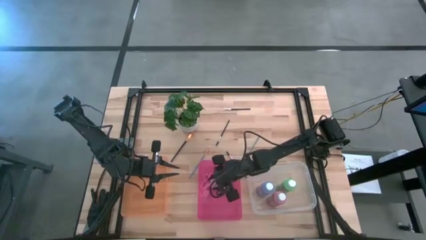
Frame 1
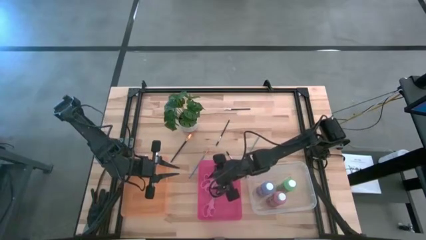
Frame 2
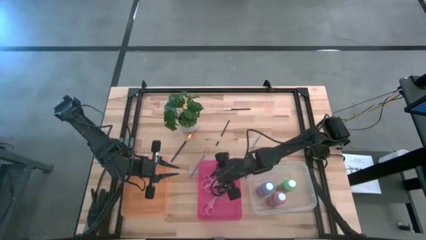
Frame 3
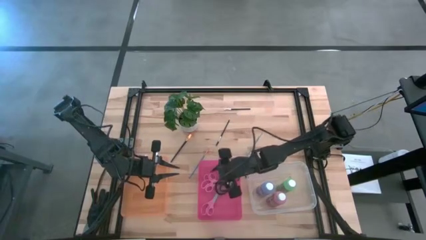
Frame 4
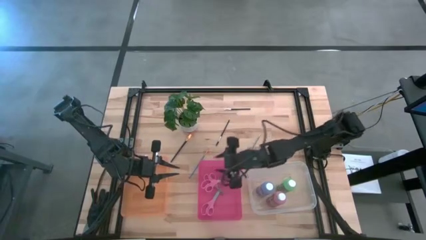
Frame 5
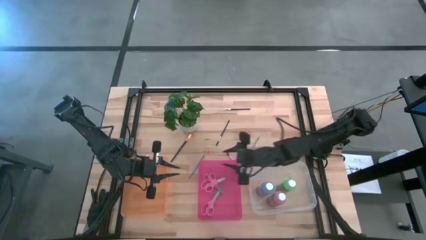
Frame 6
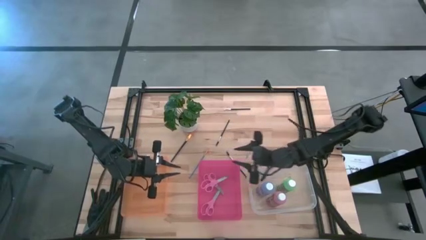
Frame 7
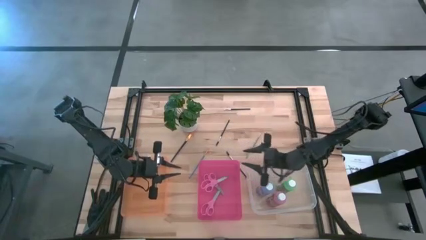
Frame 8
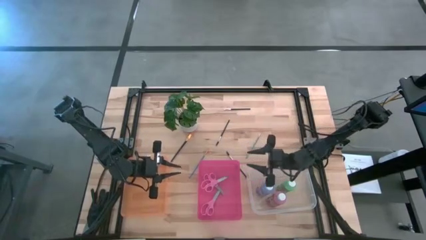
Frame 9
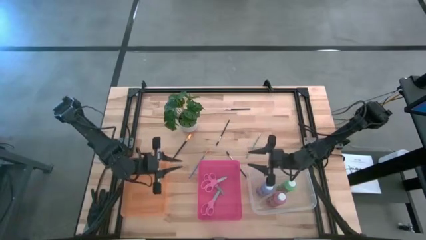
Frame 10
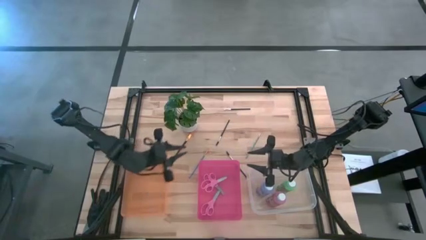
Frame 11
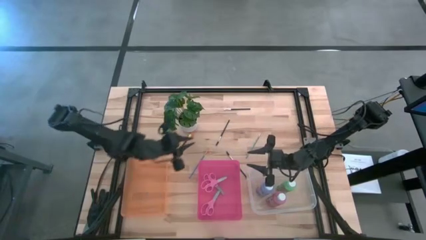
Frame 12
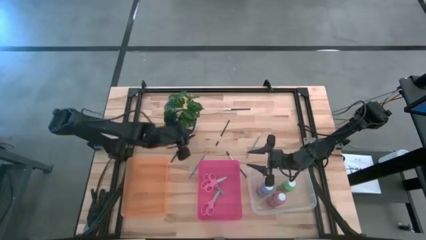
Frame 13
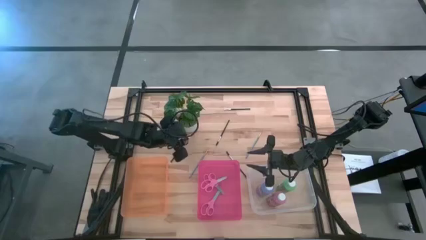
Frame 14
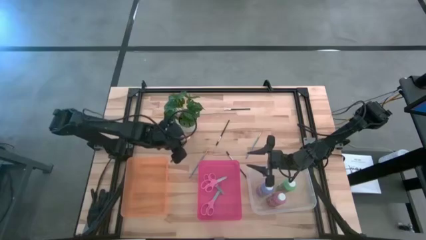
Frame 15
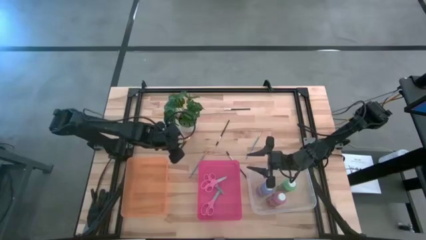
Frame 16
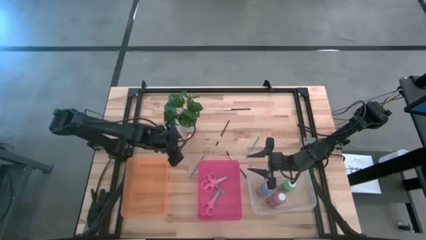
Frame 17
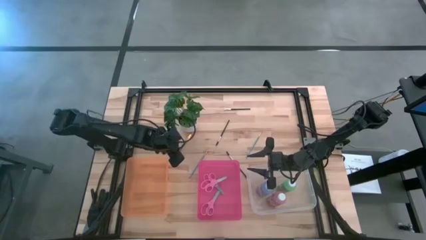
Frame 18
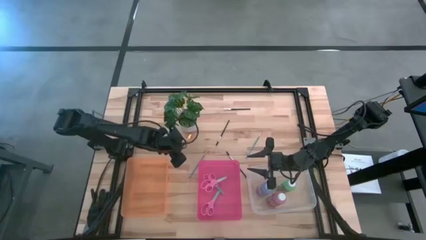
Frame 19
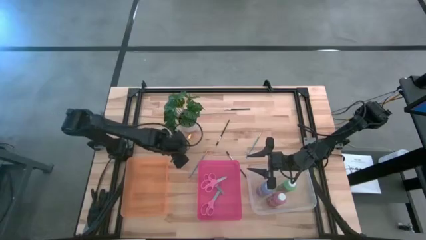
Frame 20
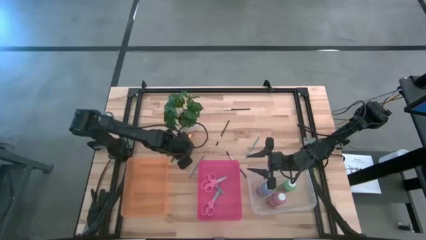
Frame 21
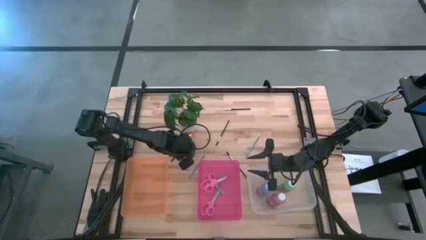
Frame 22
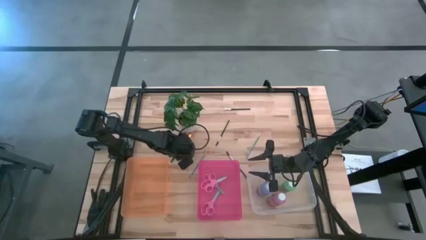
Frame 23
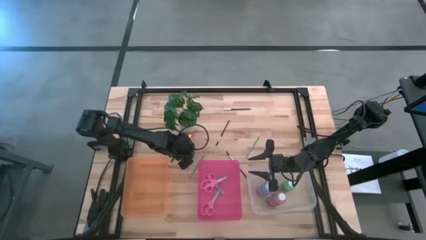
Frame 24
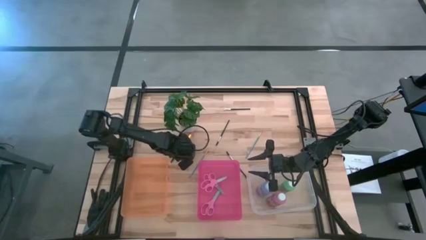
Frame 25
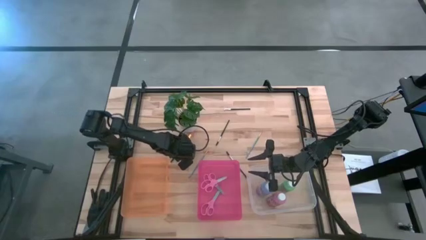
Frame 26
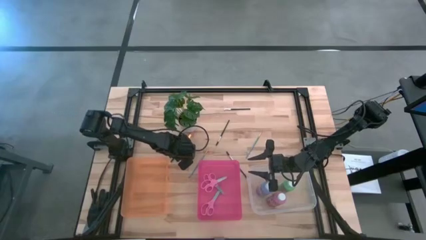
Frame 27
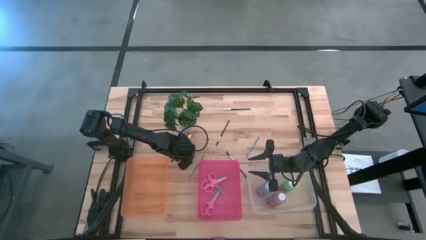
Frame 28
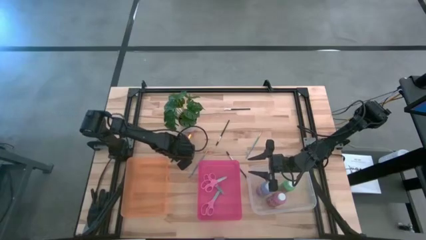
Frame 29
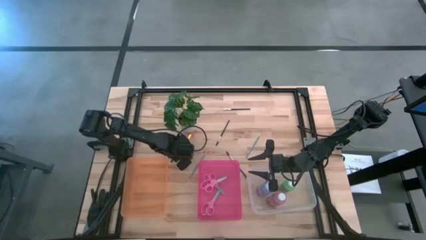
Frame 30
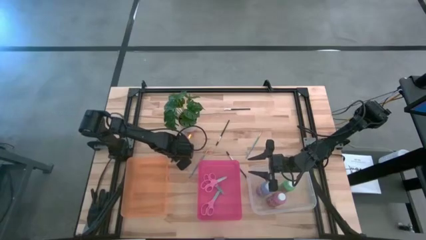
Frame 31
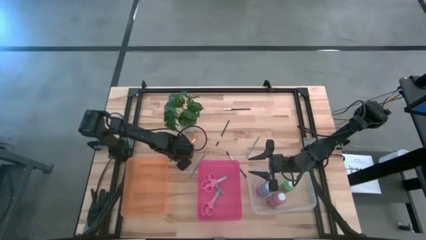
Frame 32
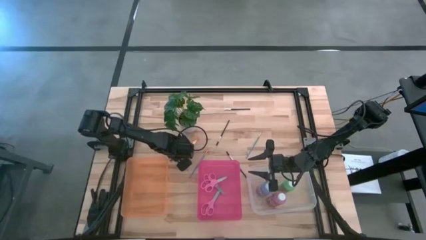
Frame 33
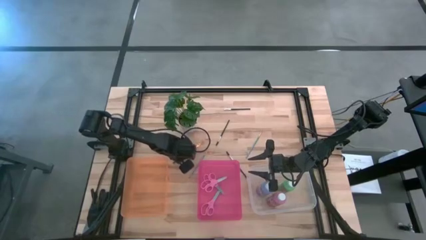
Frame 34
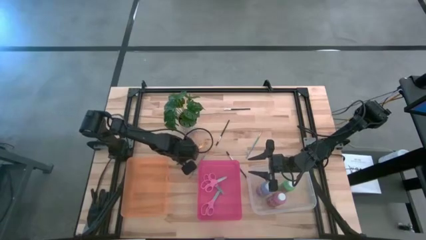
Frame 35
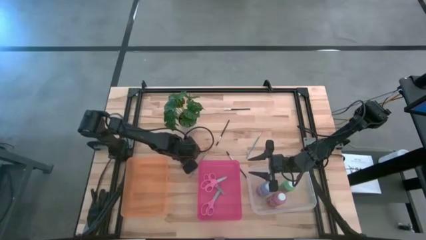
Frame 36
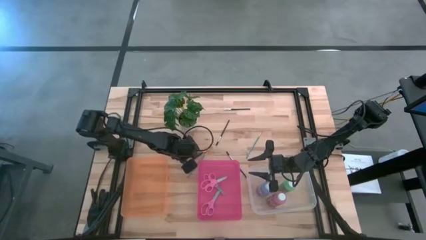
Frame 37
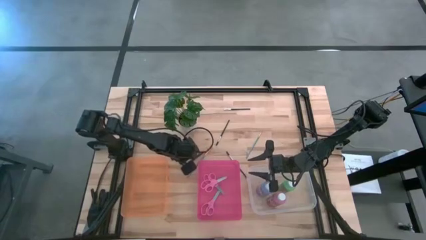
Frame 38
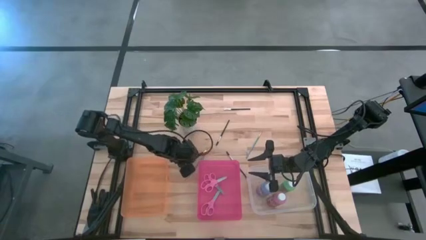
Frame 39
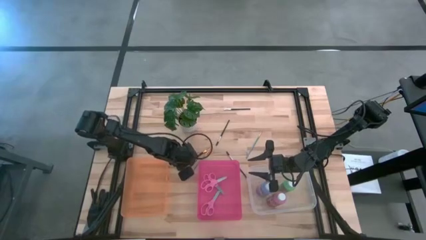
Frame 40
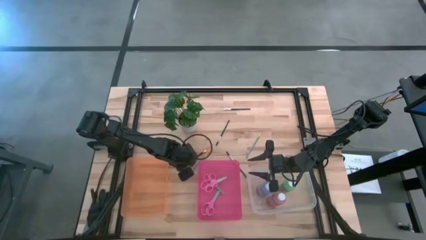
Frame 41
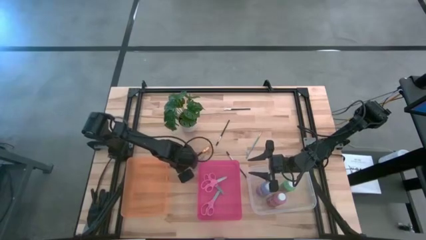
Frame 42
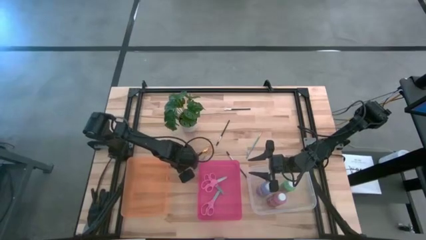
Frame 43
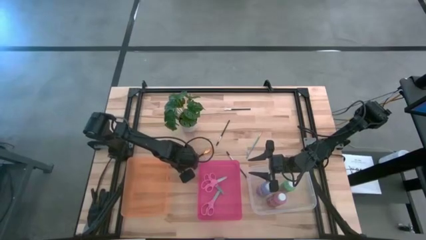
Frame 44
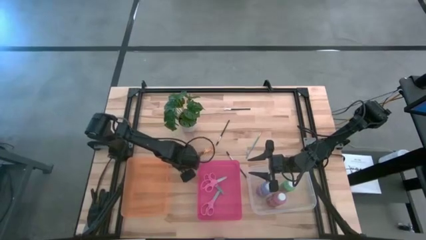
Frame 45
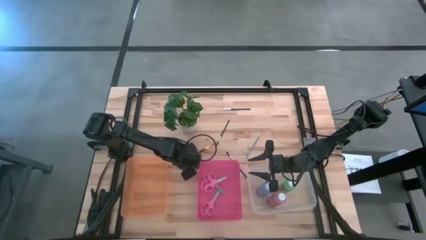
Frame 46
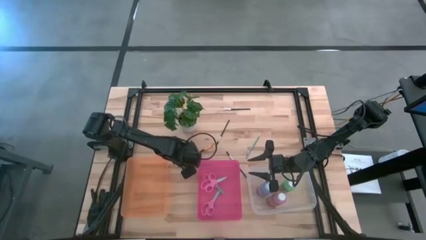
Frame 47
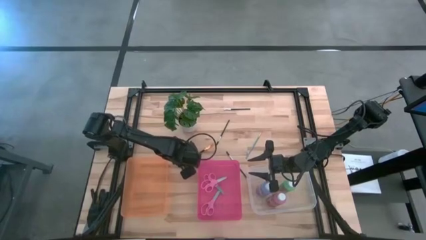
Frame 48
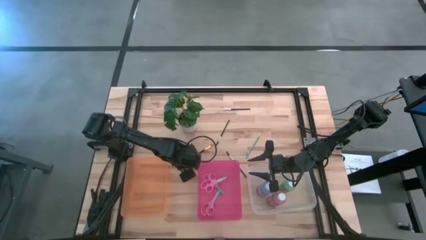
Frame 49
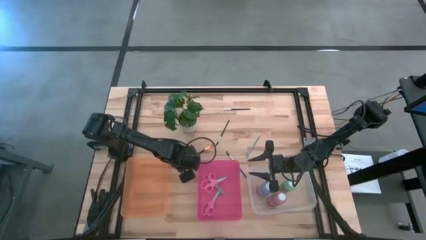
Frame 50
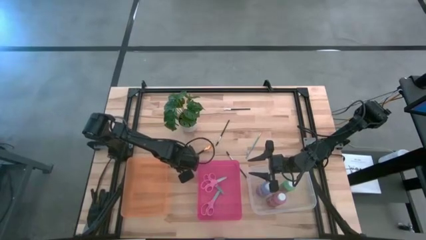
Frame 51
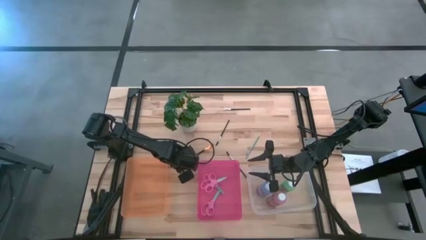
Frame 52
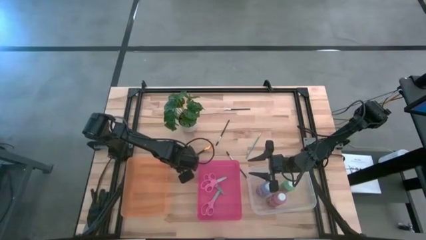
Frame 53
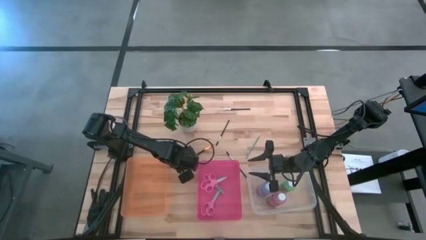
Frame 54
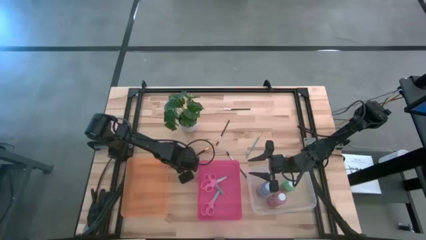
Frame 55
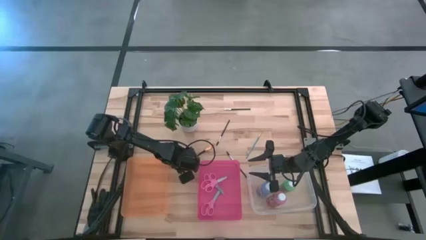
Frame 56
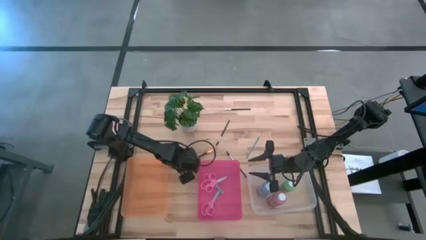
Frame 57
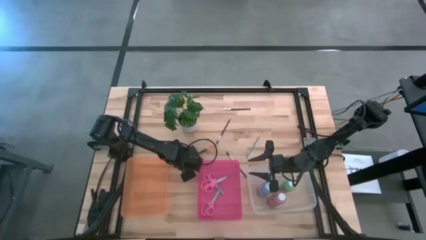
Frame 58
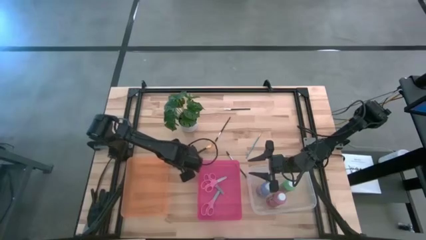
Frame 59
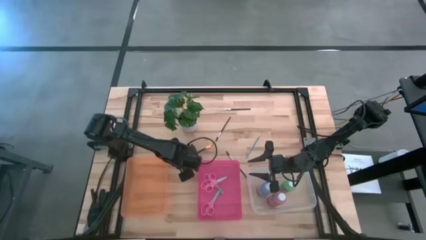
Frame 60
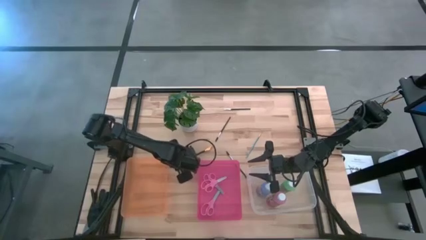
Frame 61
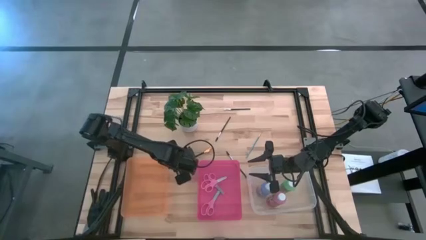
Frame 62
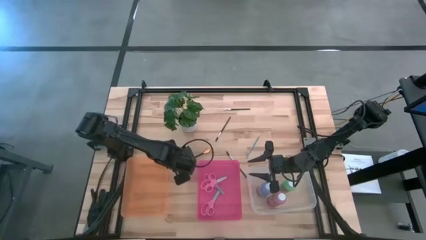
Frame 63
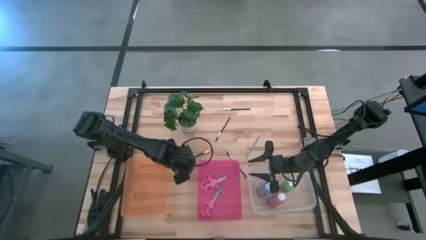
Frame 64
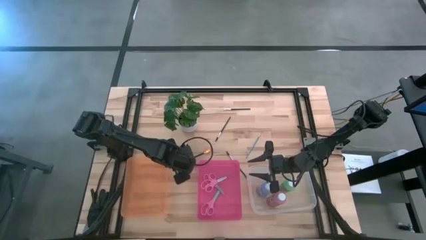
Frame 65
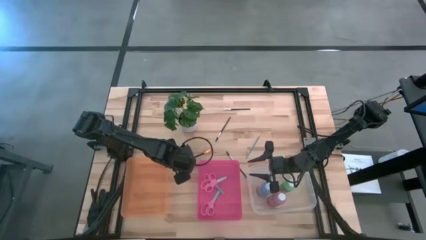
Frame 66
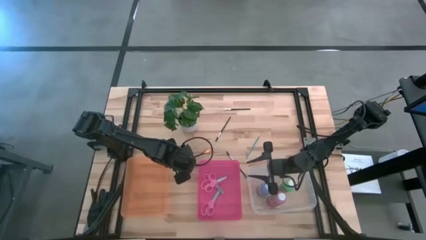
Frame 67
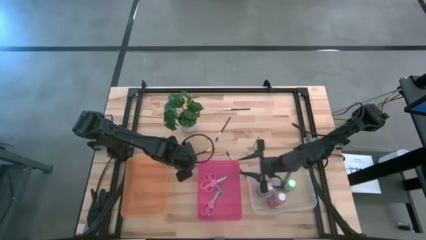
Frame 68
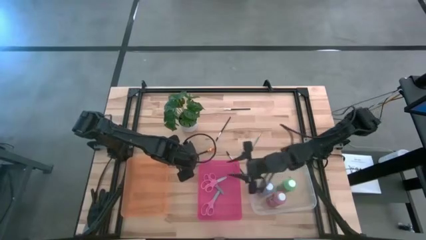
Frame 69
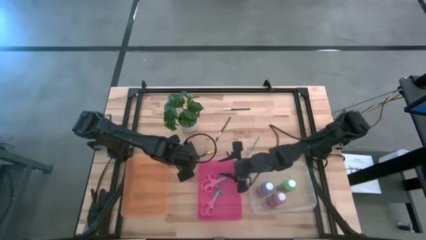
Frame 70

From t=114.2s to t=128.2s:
Task: Pick & Place Paint Supplies
Put the black paintbrush into the orange bin

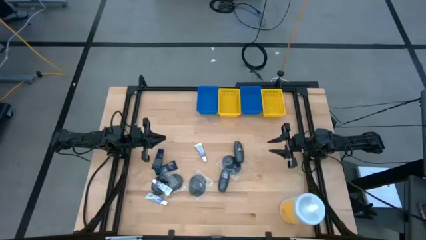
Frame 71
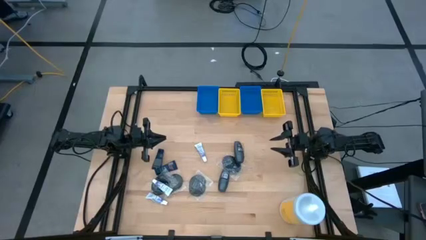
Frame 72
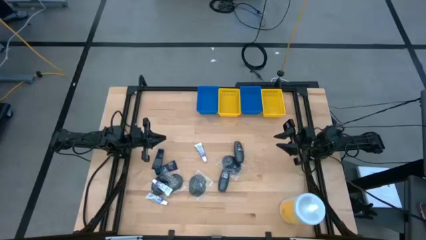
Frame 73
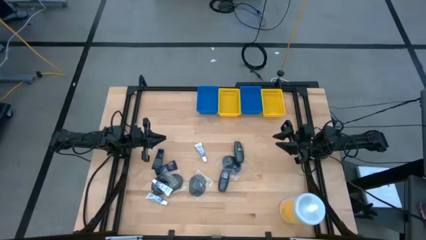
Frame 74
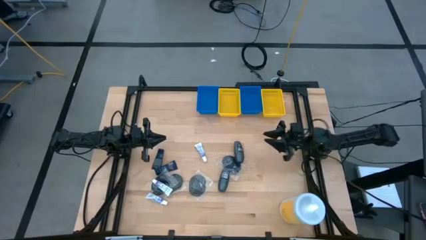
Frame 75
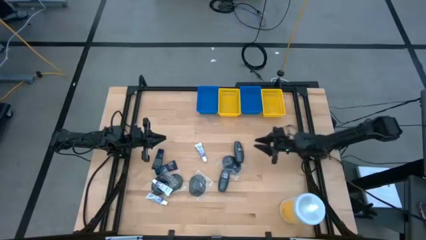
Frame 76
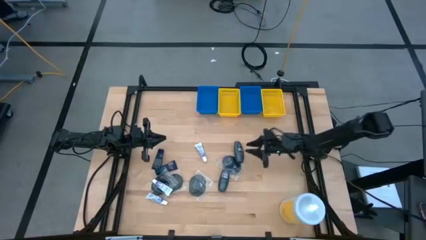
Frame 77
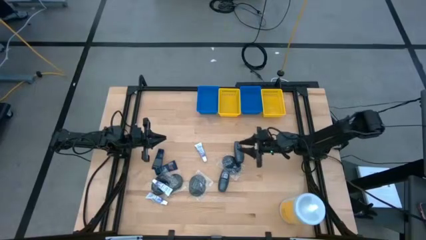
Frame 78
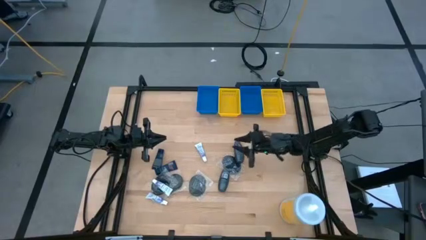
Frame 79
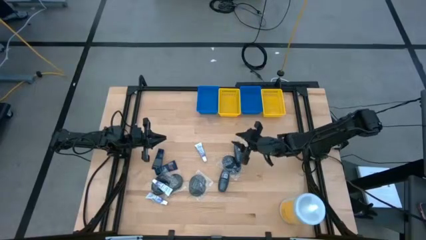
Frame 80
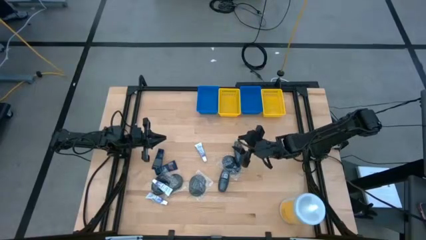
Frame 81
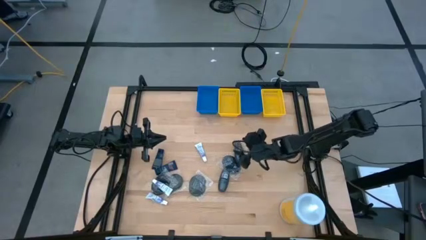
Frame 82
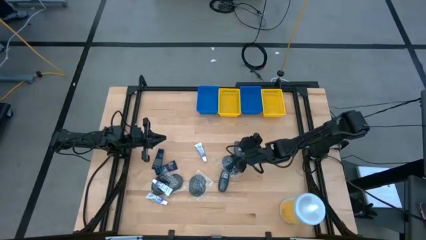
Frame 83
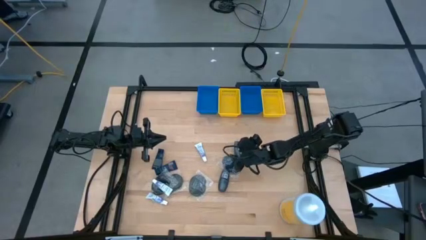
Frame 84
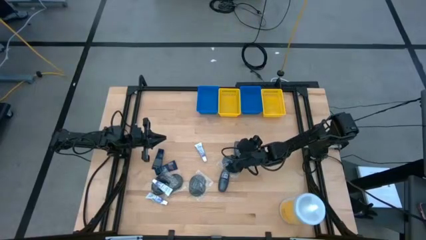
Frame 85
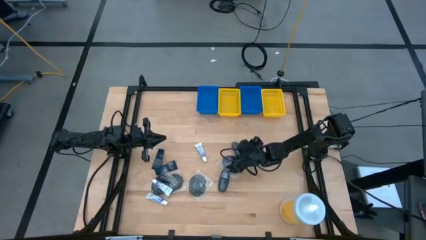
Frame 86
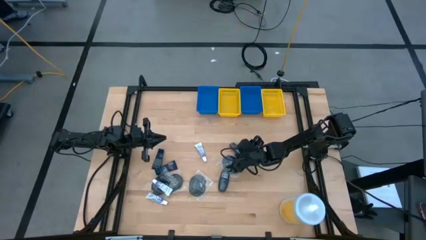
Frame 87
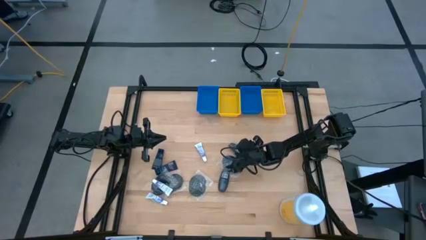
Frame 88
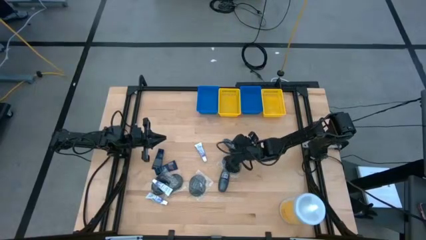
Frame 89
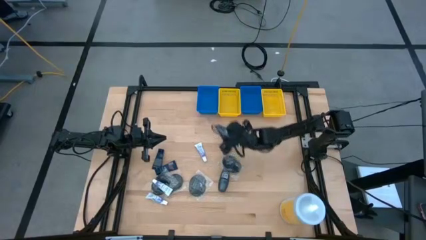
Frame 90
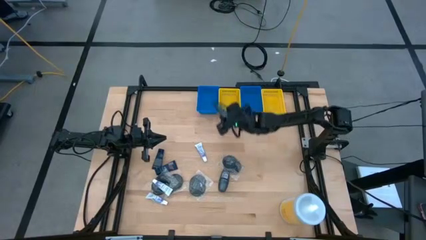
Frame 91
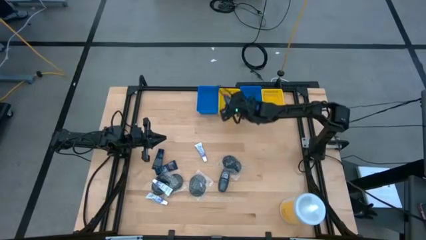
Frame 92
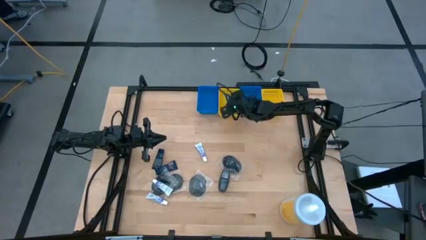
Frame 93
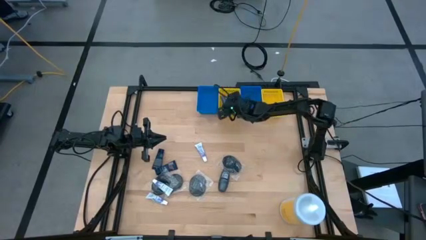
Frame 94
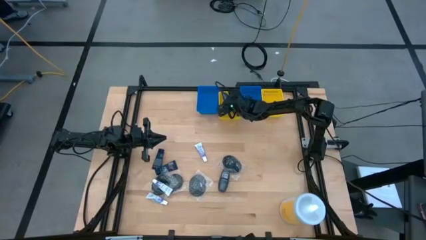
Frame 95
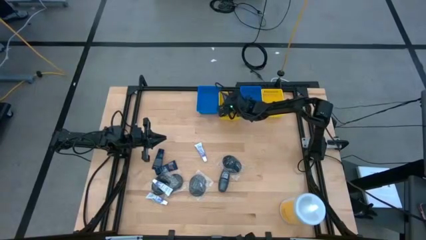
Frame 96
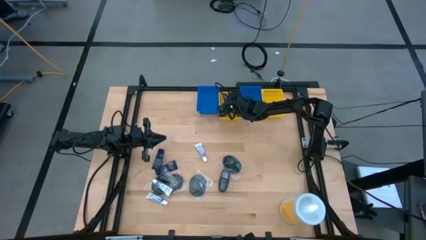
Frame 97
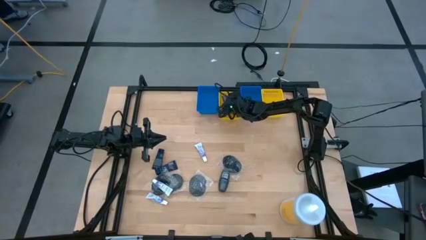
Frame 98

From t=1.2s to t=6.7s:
Task: Pick & Place Travel size toiletries
Put the gray deodorant into the left yellow bin
